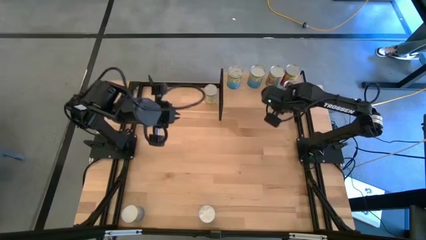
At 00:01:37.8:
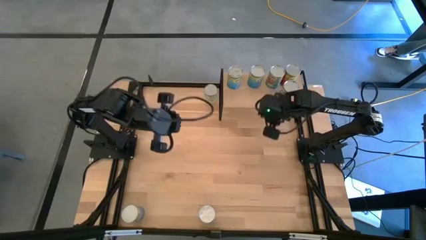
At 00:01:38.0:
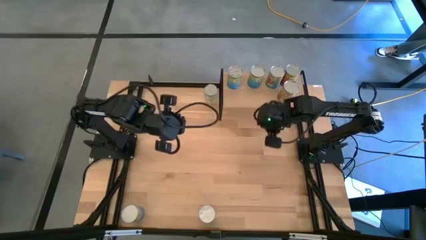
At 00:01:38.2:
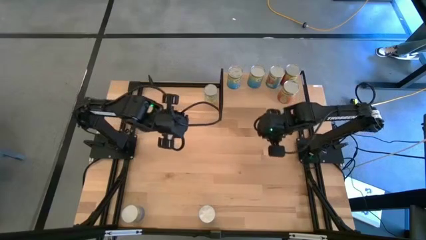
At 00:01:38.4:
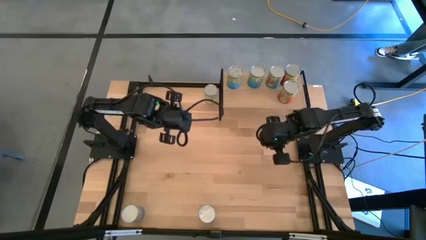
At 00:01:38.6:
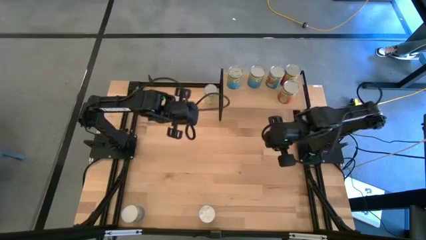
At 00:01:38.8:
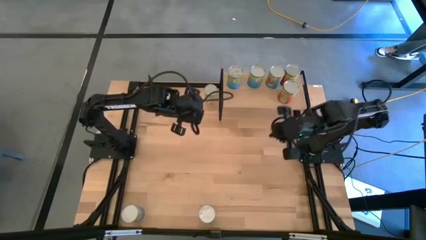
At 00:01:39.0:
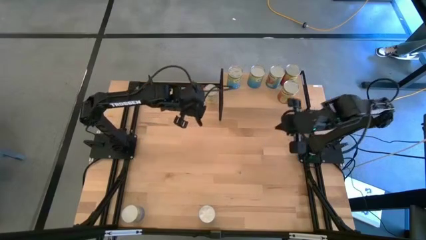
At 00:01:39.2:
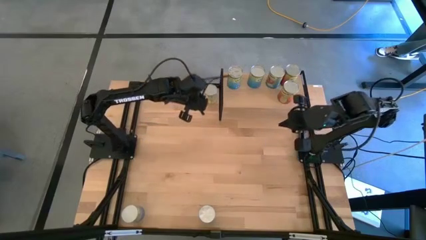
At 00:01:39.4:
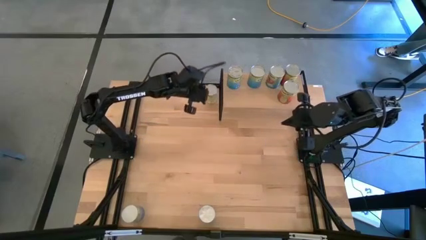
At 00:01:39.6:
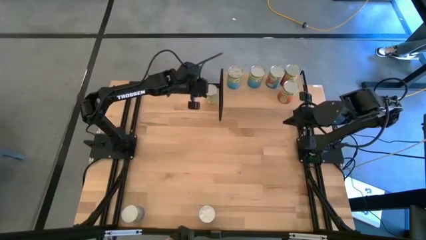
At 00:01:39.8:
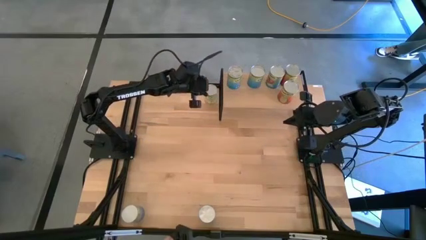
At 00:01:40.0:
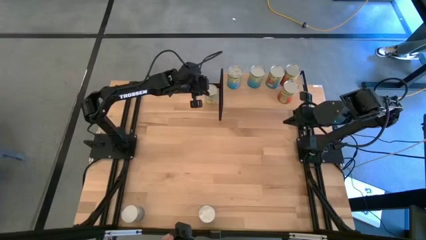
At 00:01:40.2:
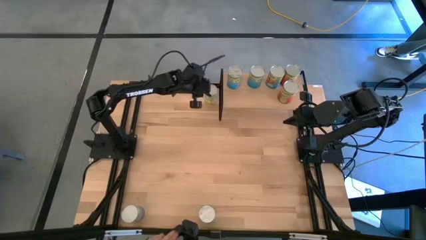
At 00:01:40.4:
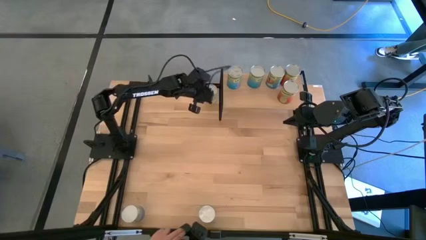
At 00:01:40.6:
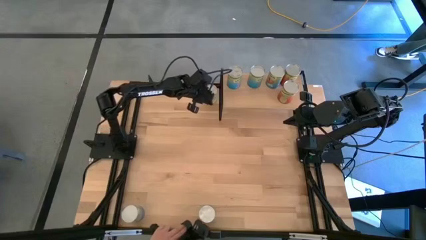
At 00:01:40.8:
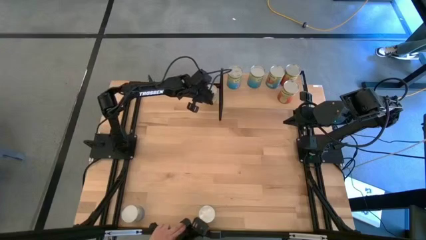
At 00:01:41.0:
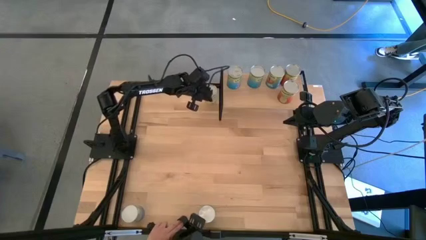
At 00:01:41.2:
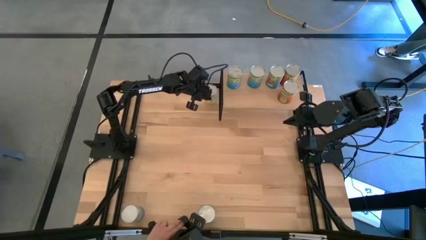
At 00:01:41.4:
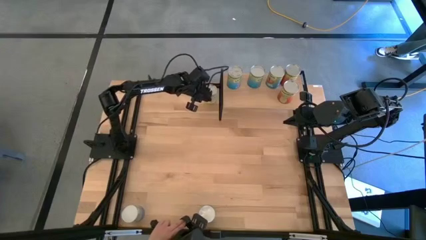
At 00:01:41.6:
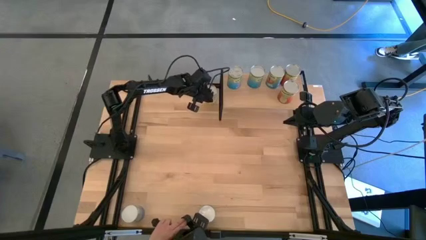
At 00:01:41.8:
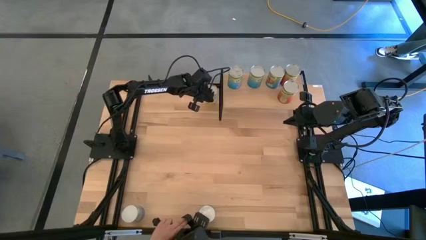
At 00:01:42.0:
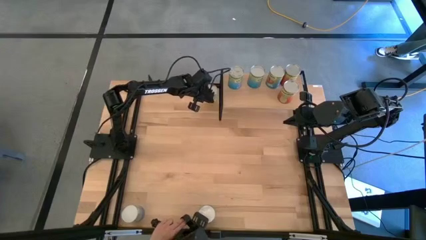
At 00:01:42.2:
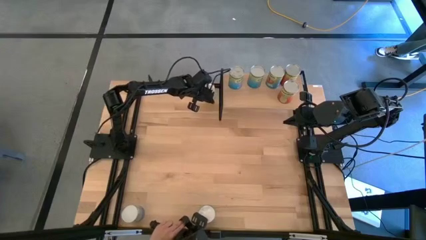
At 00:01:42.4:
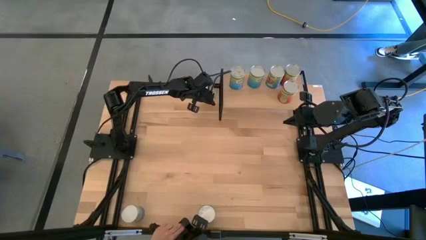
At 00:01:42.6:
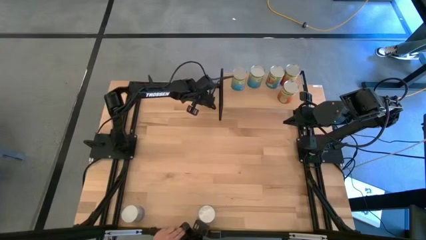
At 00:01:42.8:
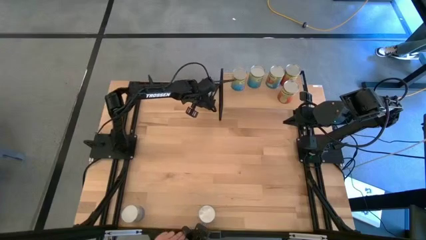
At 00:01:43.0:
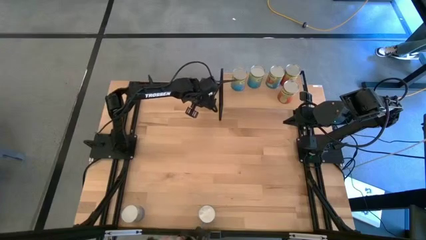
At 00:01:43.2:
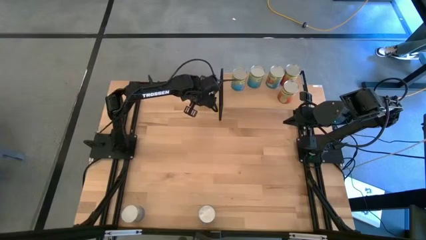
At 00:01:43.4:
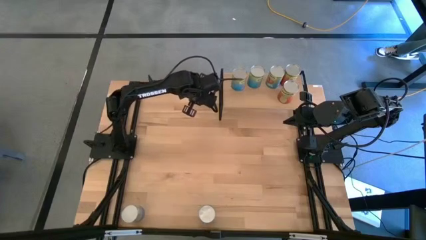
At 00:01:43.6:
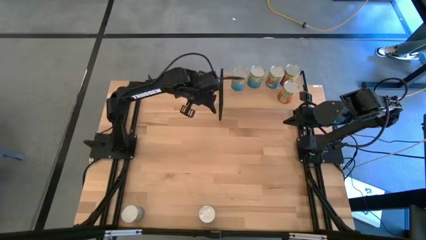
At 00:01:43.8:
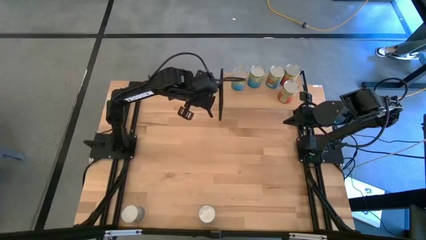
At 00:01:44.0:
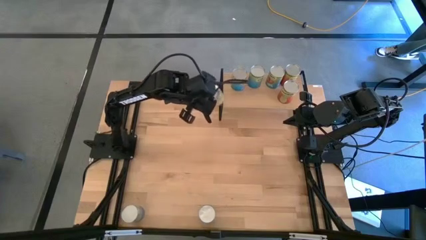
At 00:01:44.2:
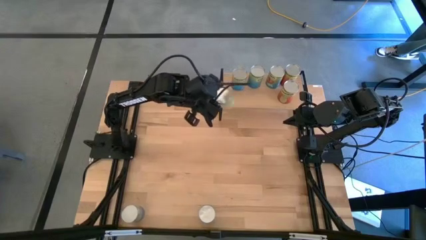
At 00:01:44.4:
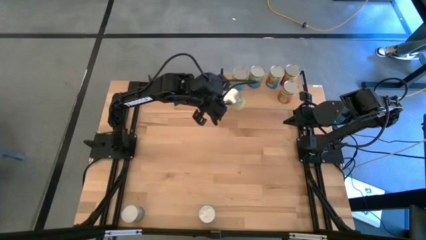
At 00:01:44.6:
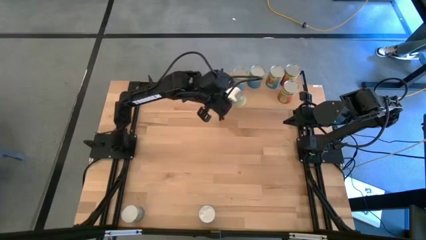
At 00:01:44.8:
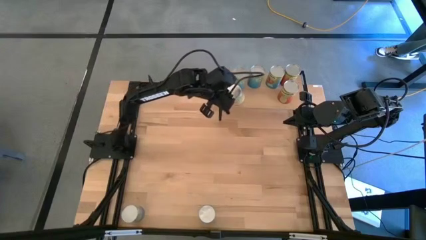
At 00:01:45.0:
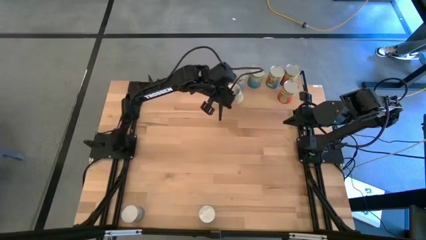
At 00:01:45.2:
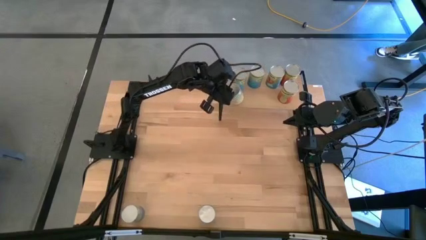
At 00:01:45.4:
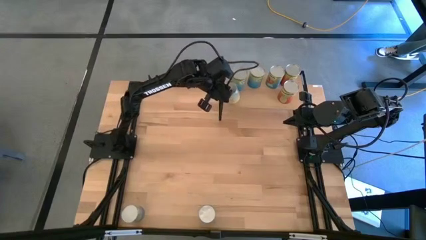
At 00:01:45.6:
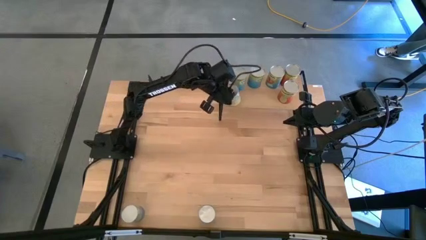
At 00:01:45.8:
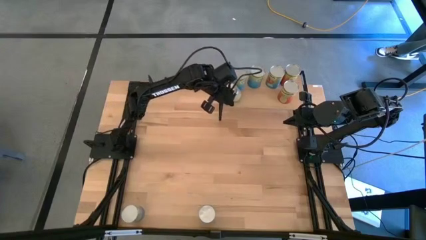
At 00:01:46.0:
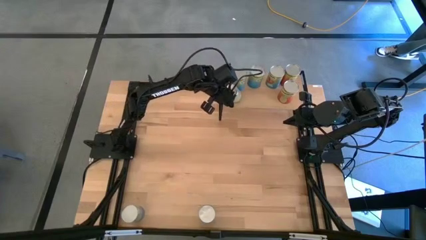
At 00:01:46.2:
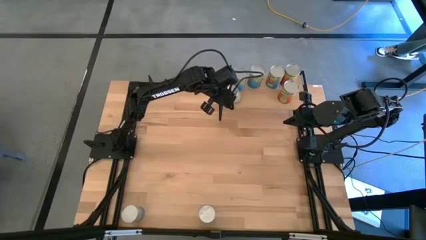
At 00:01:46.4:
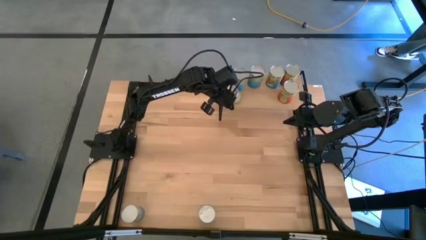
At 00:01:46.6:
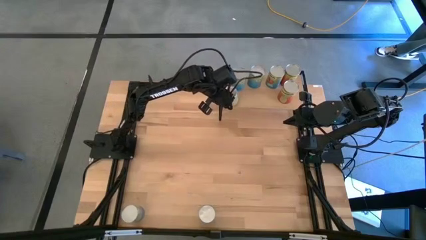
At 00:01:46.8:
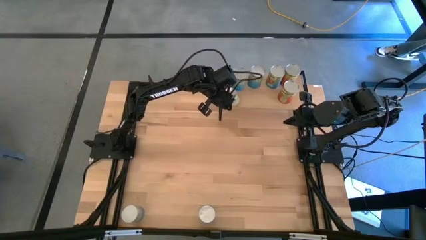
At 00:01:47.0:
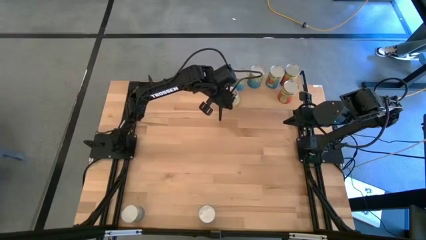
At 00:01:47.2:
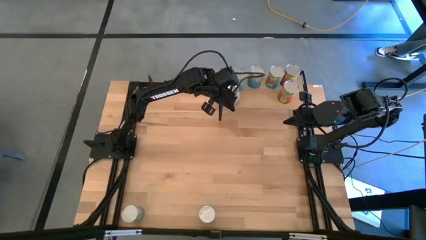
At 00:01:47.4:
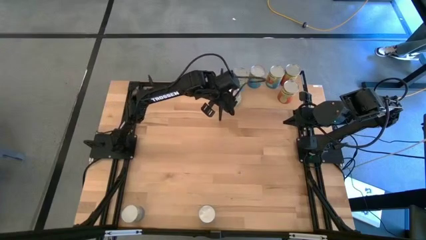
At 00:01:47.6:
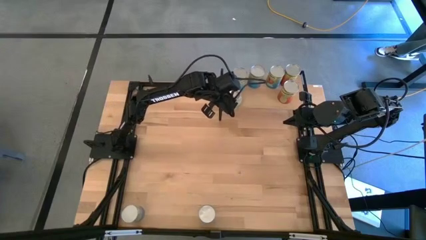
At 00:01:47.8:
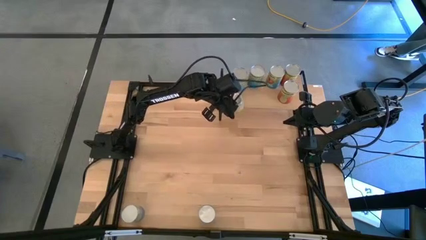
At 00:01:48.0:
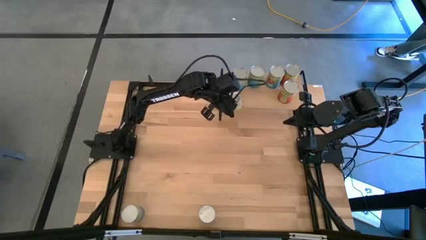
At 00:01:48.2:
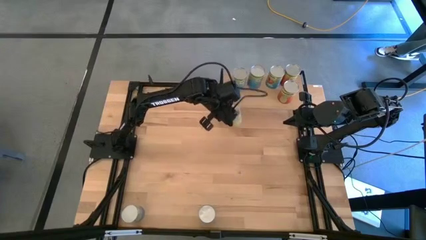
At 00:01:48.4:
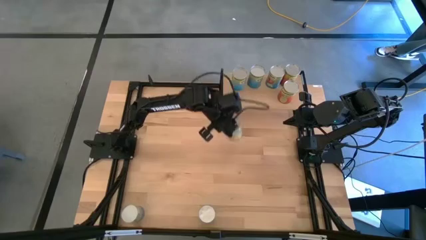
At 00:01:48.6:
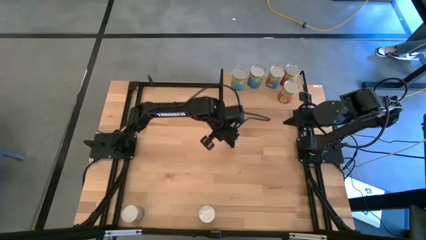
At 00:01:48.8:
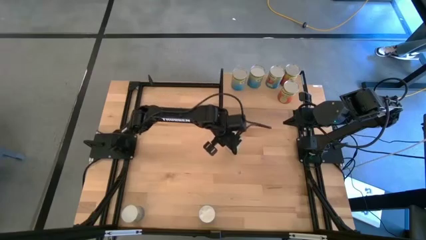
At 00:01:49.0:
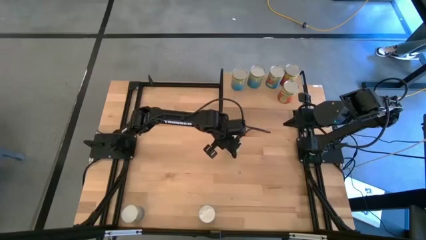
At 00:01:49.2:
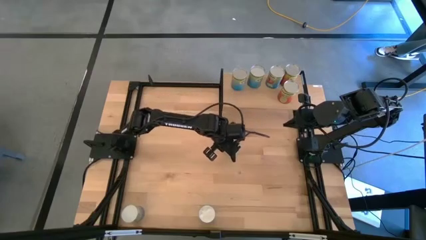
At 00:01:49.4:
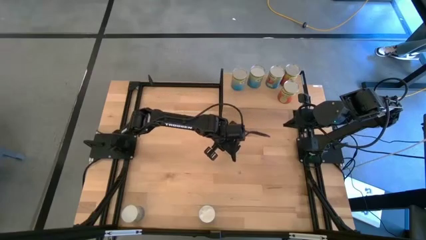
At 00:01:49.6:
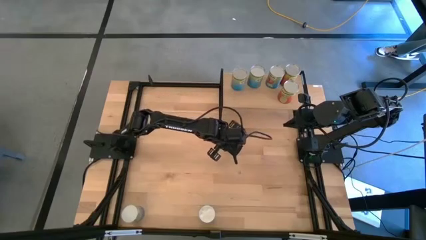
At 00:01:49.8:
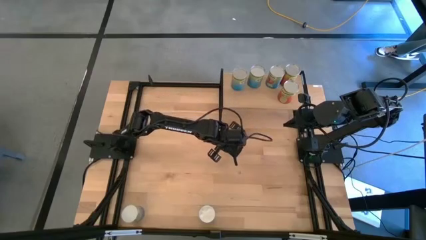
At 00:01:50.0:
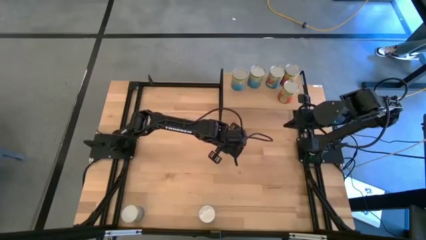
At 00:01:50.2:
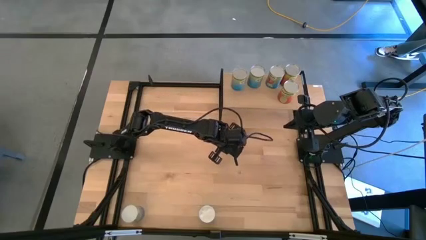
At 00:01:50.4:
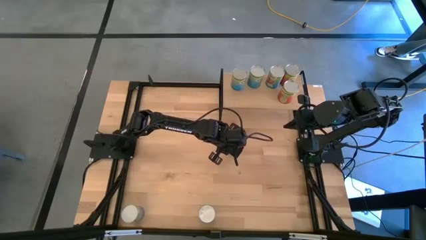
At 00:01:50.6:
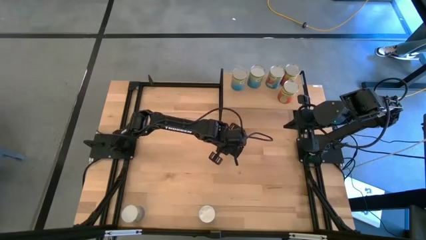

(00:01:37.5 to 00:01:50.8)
Task: Pick and place cans onto a shelf
Put the canned carrots on the shelf

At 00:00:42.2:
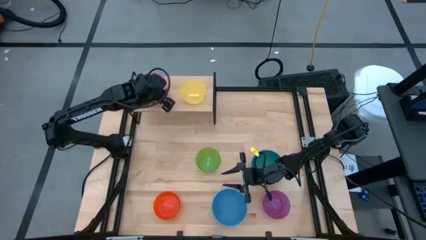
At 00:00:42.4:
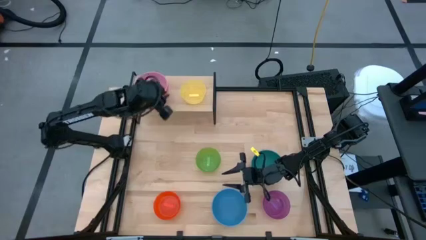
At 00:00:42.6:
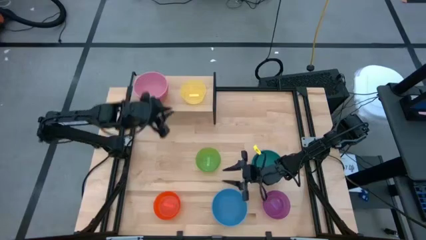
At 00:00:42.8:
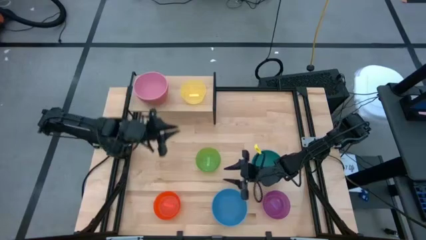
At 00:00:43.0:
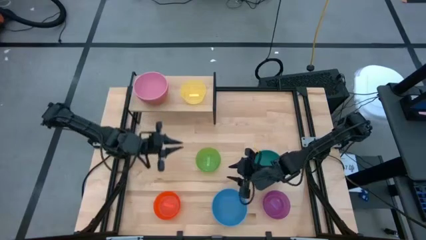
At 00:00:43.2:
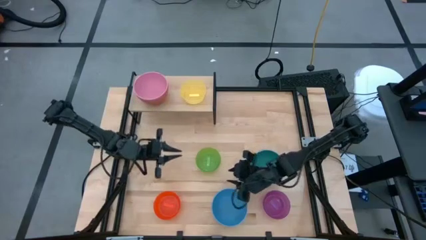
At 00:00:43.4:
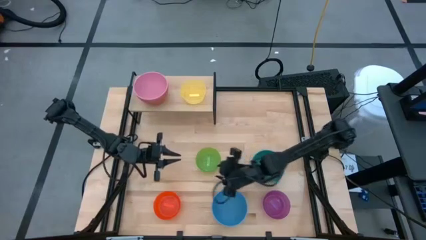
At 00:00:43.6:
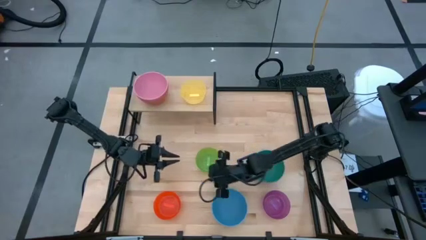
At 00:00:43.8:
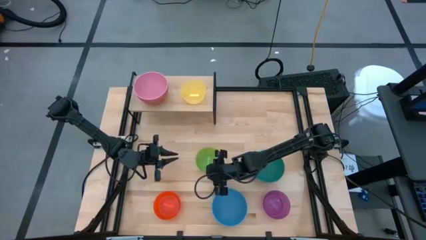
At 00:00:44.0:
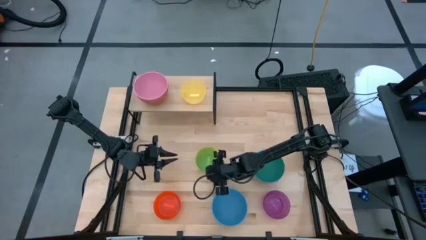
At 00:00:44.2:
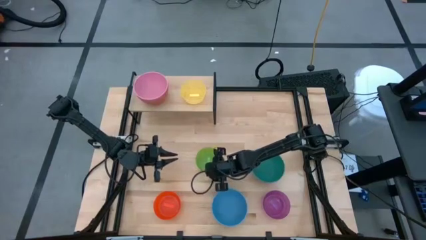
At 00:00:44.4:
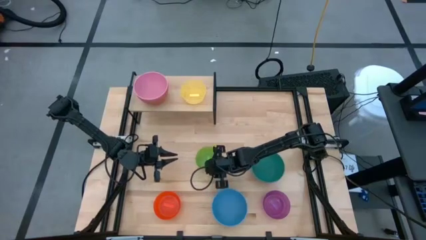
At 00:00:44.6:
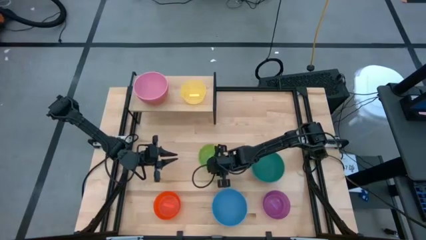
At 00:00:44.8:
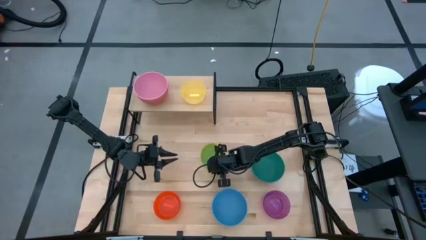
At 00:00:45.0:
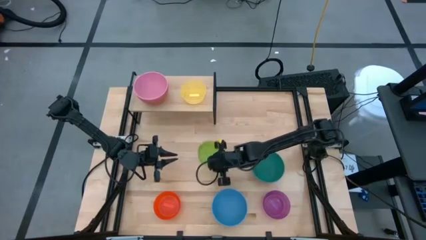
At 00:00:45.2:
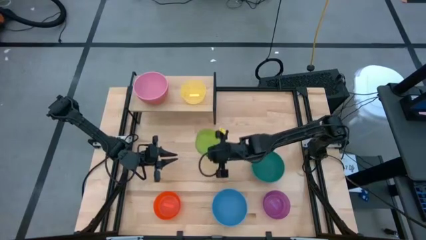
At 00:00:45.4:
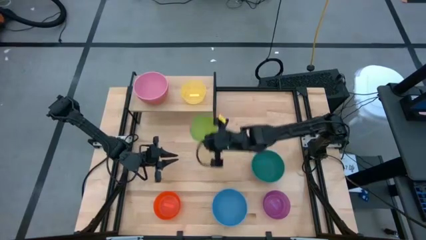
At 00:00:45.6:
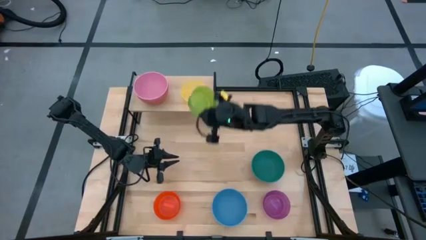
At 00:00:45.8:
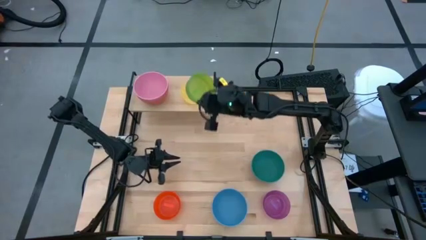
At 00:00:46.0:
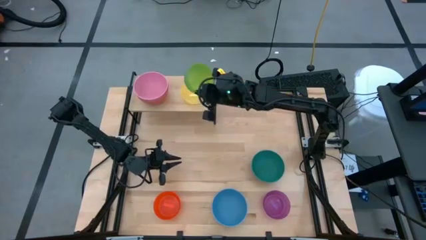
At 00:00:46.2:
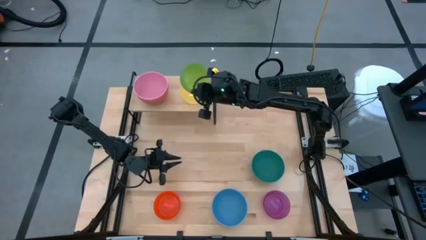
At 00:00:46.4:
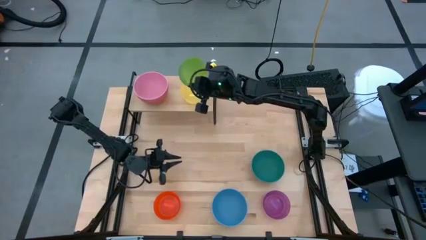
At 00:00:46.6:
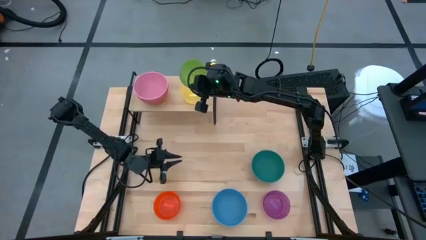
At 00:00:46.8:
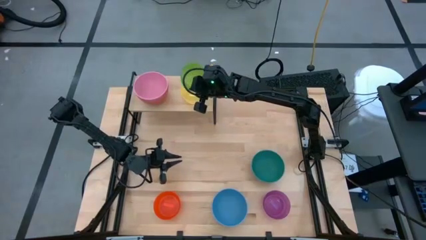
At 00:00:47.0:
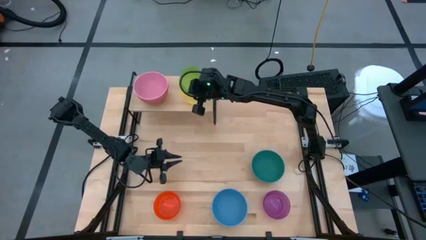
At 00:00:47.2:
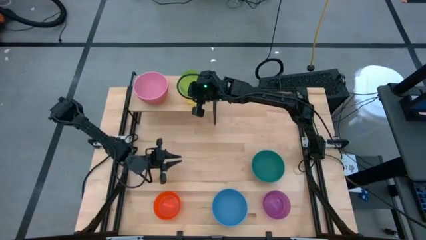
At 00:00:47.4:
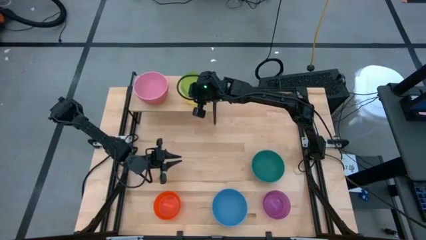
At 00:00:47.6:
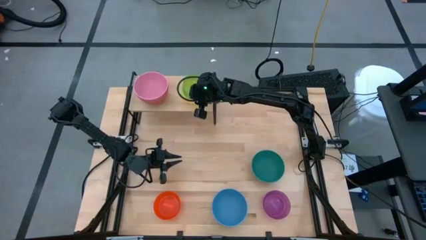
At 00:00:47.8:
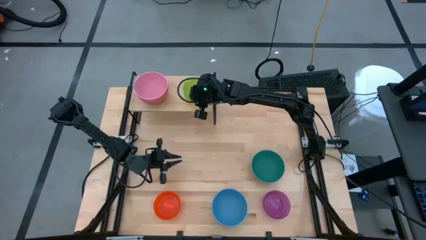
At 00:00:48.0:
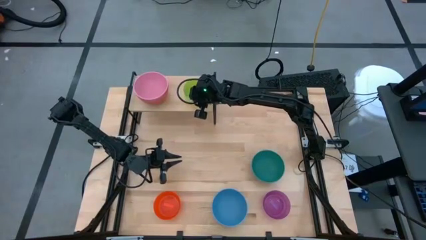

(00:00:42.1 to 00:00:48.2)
Task: Place and stack bowls onto a shelf
Stack the green bowl into the yellow bowl on the shelf
